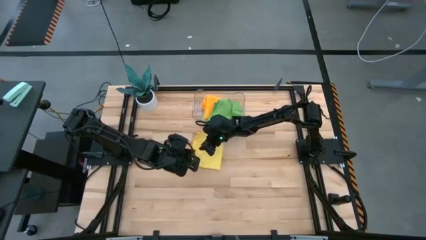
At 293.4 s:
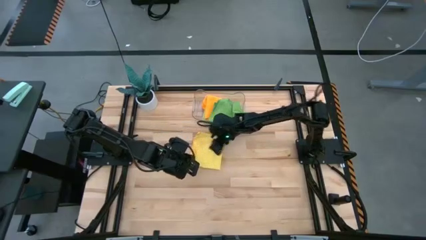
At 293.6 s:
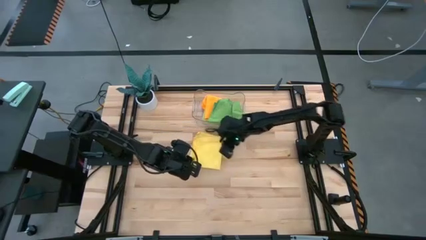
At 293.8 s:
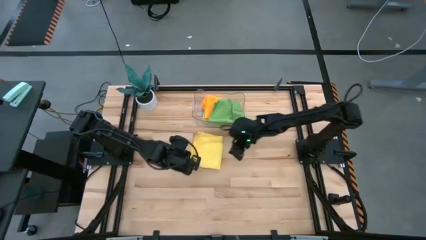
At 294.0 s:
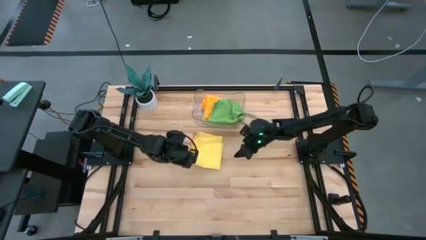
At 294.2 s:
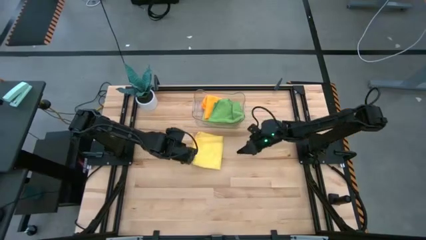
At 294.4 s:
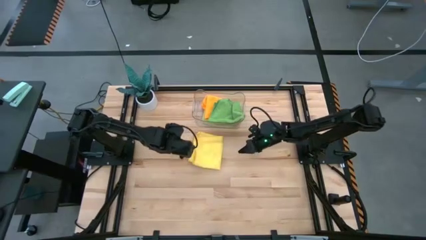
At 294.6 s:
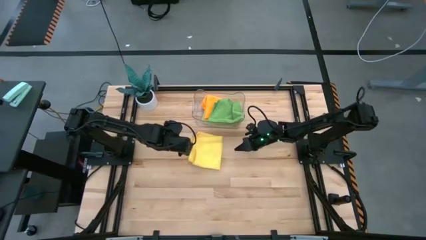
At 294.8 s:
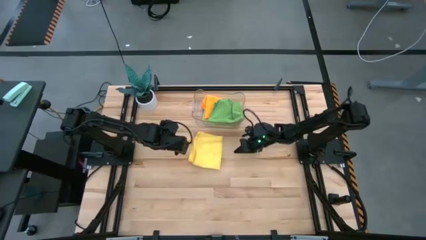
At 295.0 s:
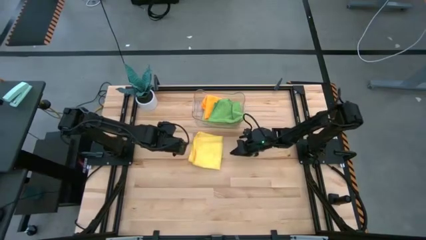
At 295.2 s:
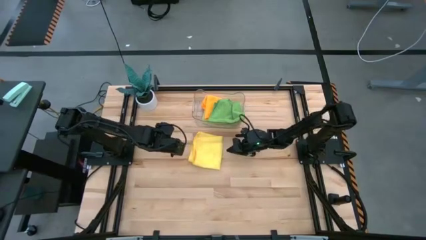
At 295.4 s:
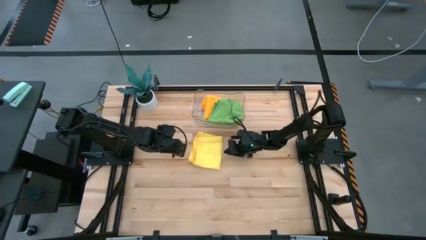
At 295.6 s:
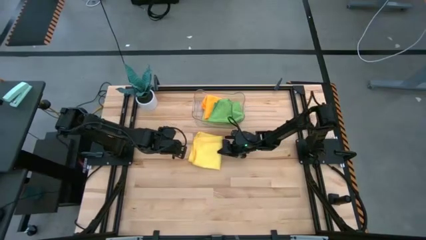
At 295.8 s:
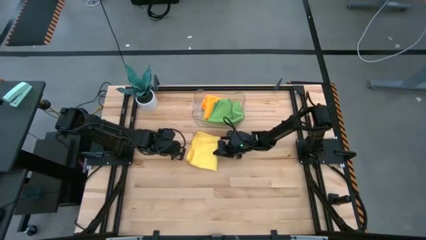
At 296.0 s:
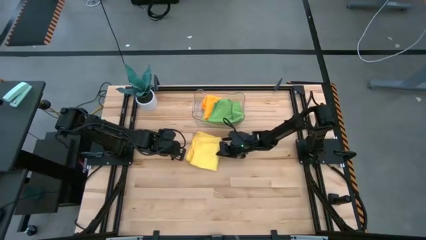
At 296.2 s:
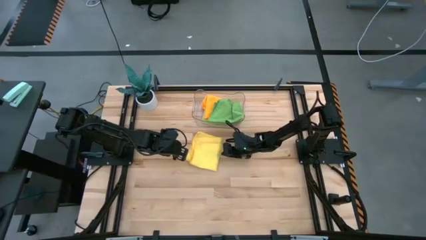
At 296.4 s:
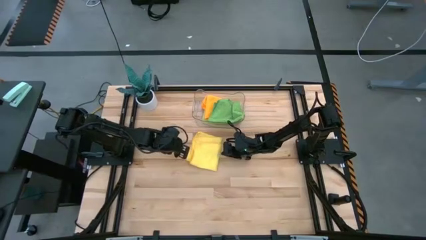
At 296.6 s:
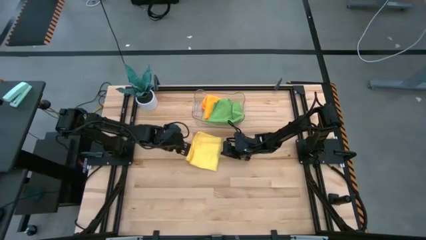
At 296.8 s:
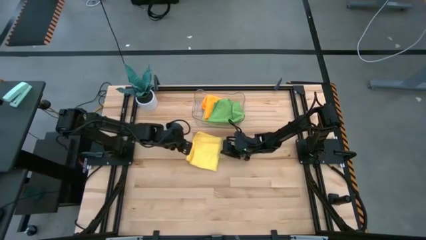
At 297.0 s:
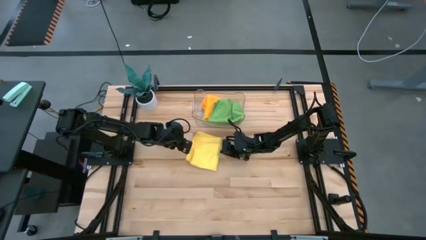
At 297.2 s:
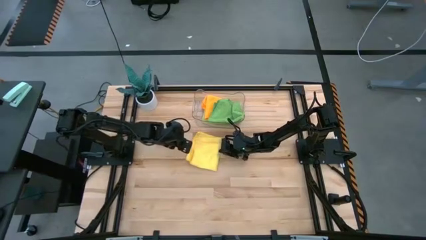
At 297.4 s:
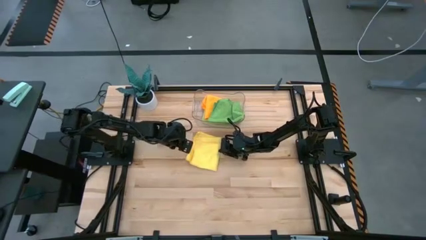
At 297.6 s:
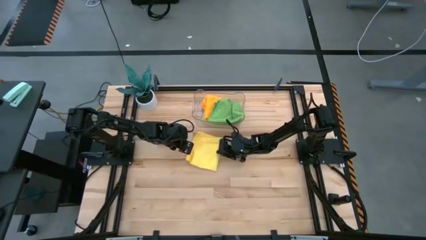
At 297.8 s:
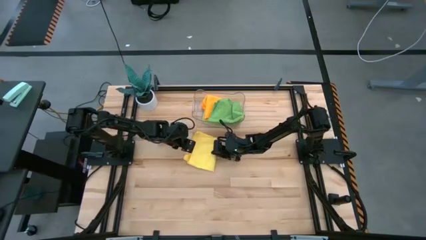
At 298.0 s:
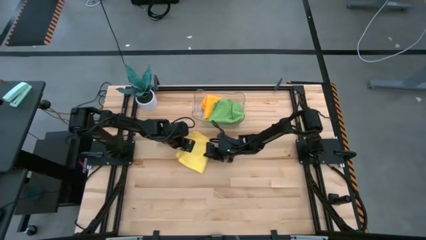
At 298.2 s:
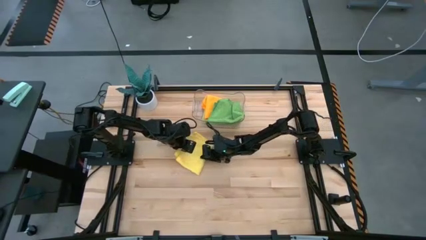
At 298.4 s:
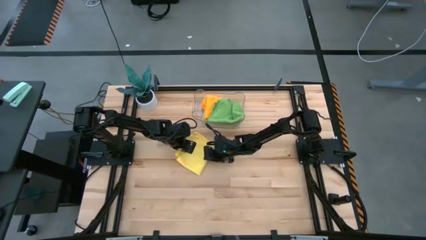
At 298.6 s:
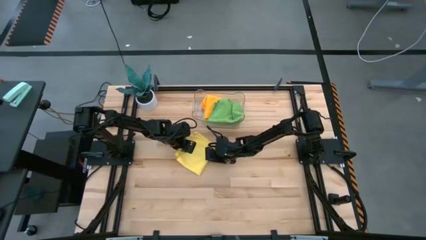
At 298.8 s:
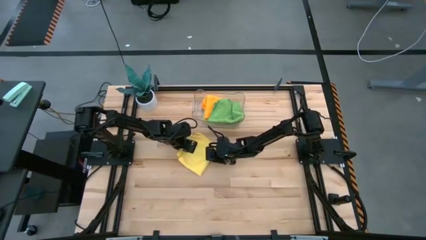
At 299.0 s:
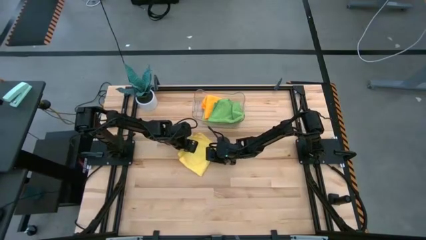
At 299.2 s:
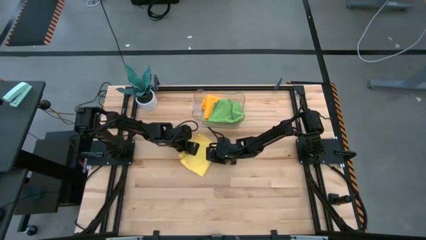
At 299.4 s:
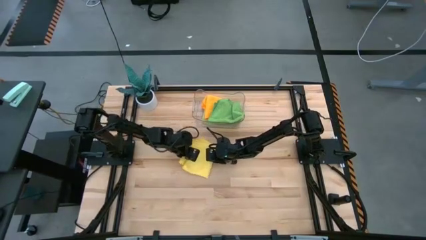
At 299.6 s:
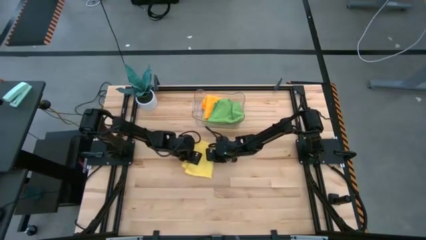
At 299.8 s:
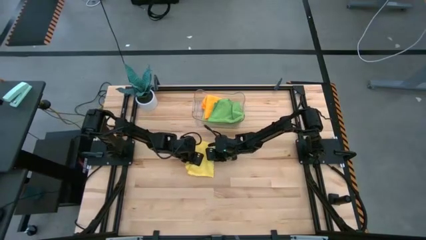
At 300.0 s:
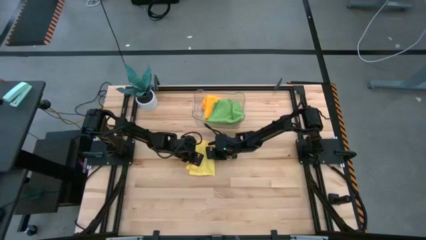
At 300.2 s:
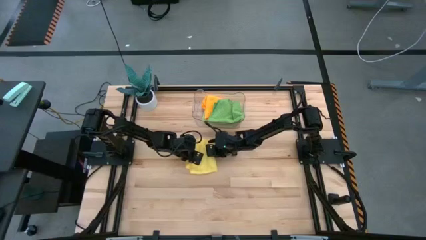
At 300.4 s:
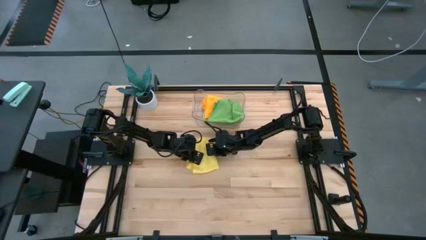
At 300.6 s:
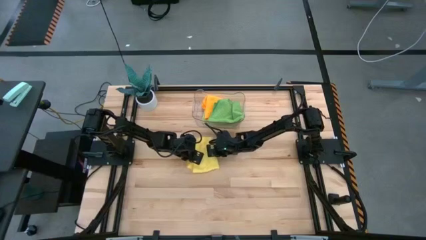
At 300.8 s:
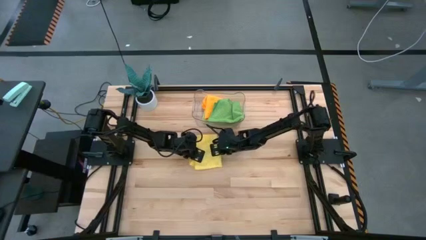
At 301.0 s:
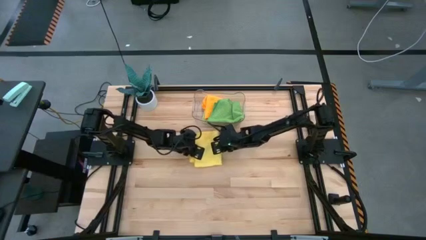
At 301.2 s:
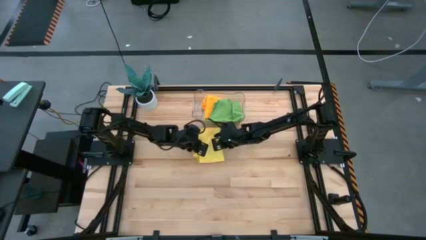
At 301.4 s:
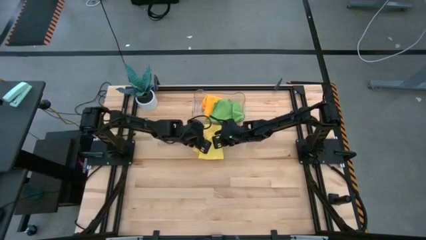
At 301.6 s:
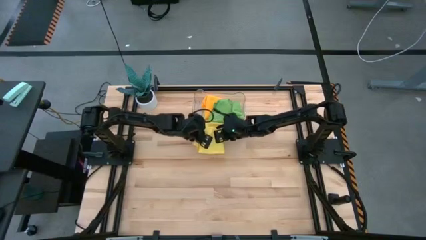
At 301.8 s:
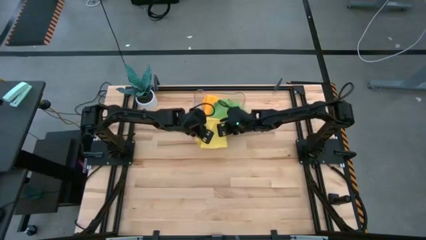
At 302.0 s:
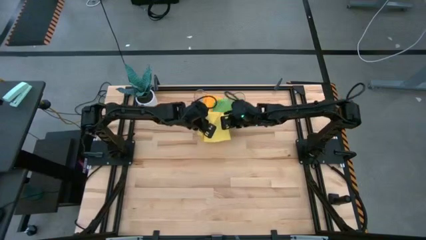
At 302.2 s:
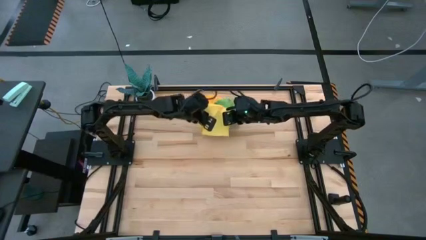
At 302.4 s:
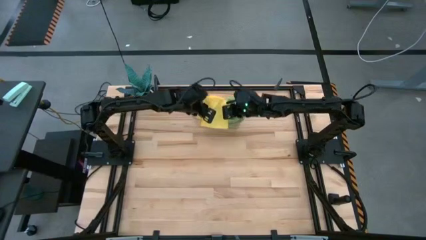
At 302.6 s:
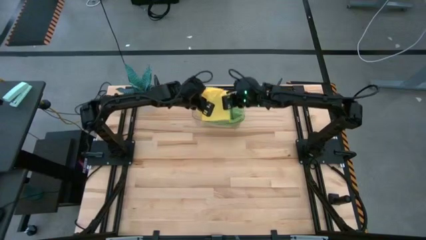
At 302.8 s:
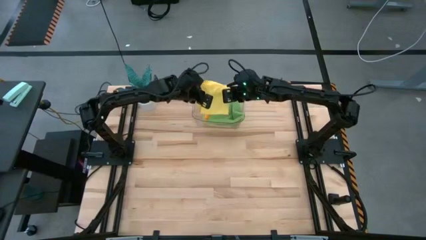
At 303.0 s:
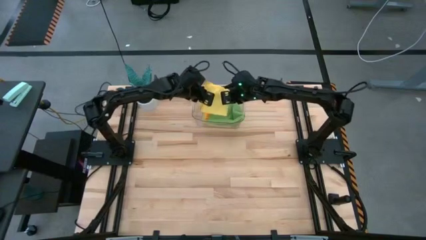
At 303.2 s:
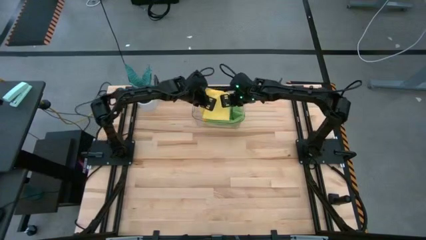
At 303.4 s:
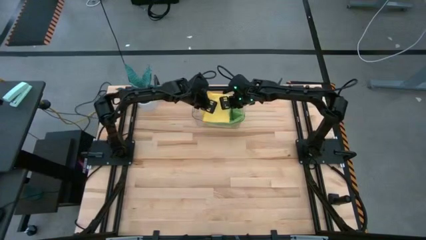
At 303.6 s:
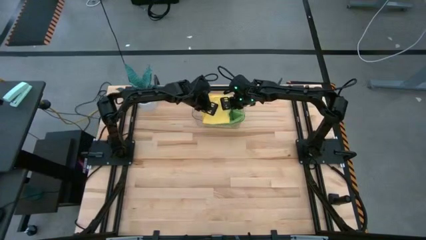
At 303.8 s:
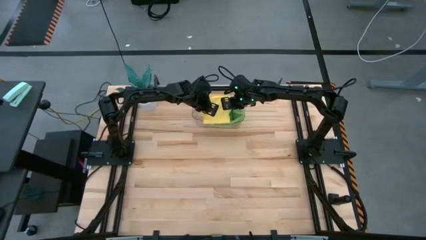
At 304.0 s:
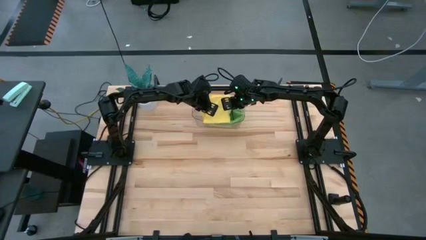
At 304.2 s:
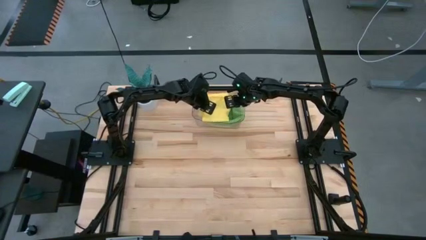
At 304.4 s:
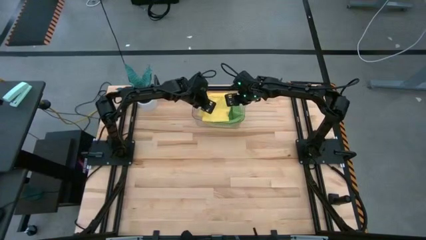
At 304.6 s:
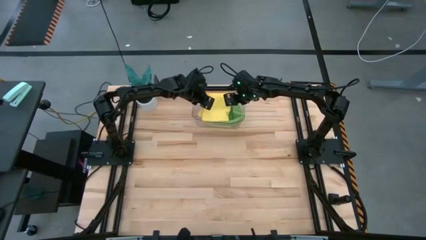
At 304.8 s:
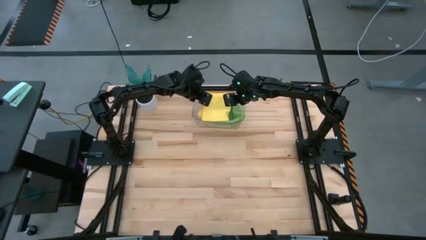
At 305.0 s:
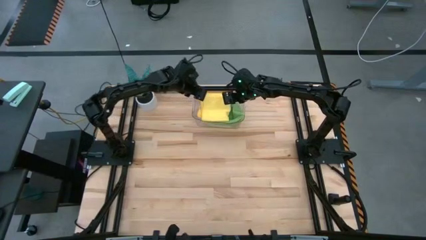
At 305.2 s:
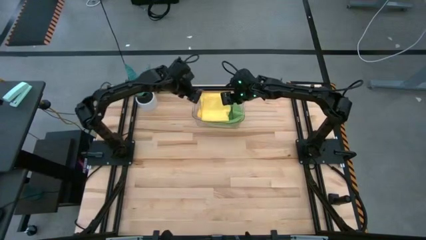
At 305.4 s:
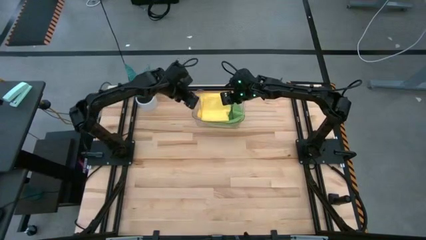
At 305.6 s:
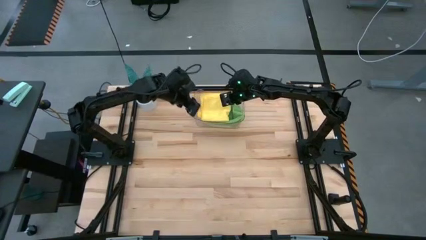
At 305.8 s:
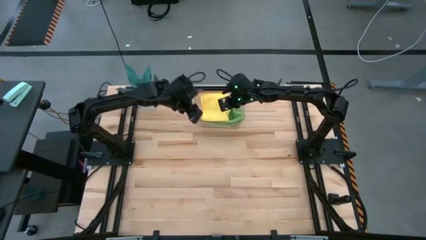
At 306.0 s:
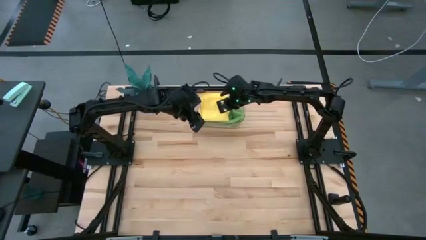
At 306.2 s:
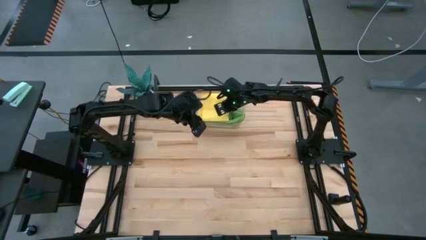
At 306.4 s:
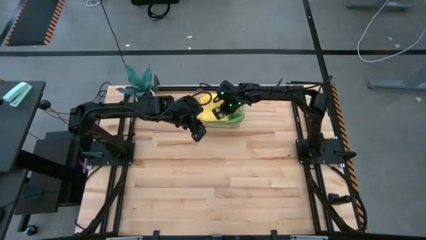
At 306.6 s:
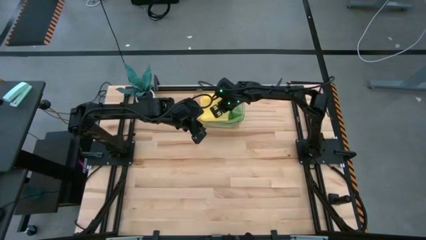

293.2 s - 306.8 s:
Task: Fold microfiber towels
Put the yellow microfiber cloth into the transparent bin
